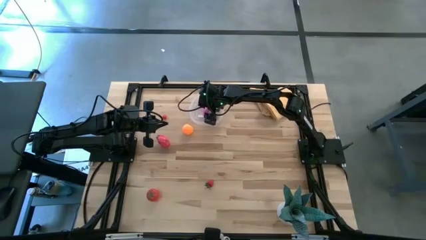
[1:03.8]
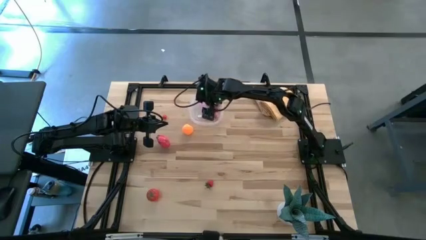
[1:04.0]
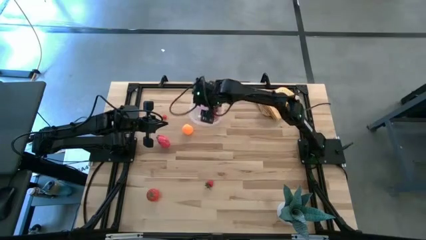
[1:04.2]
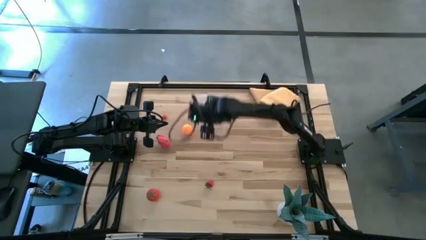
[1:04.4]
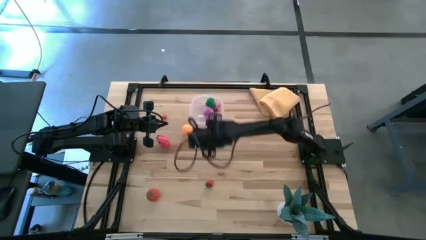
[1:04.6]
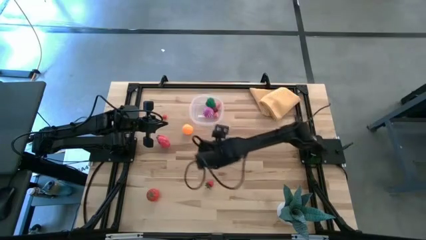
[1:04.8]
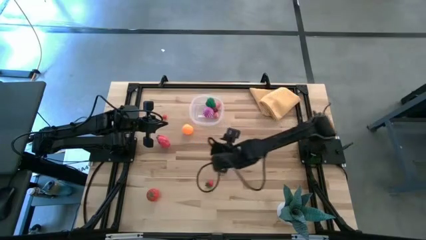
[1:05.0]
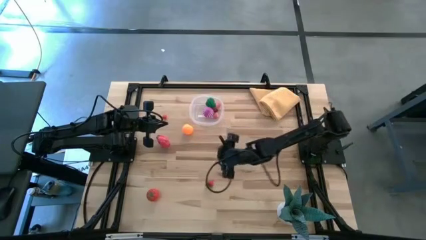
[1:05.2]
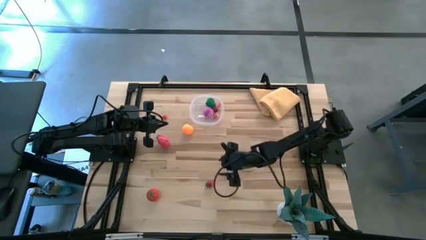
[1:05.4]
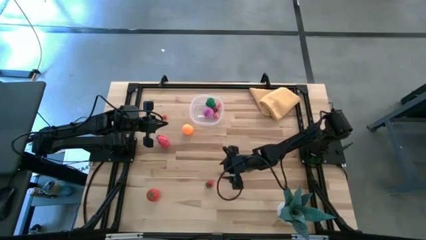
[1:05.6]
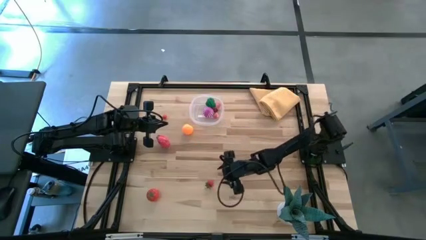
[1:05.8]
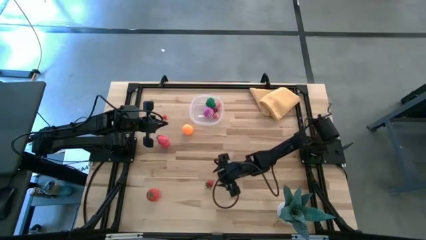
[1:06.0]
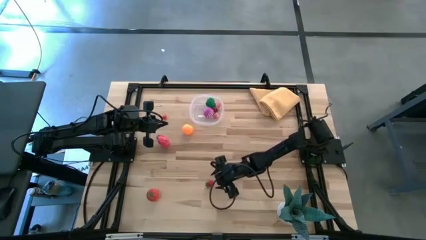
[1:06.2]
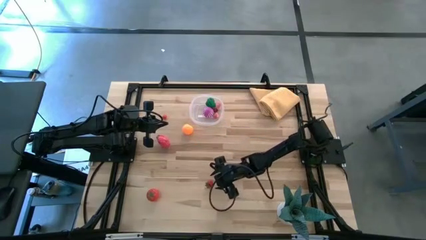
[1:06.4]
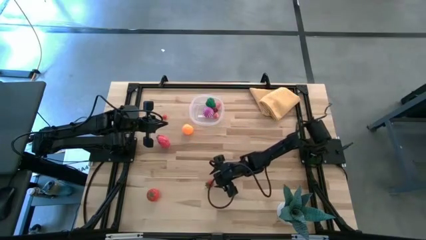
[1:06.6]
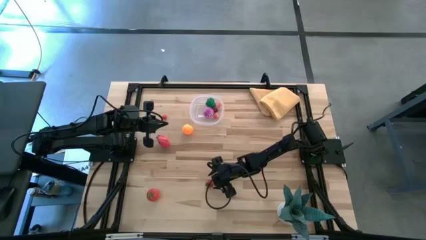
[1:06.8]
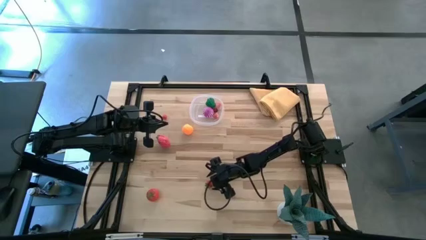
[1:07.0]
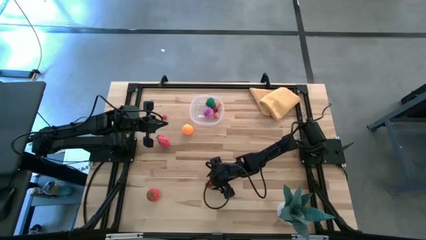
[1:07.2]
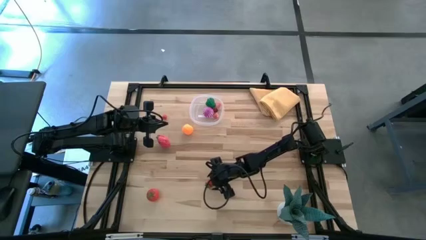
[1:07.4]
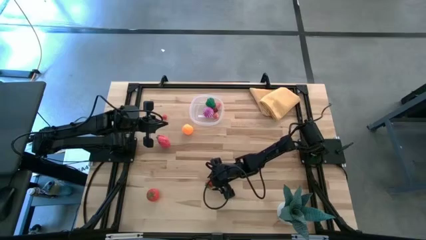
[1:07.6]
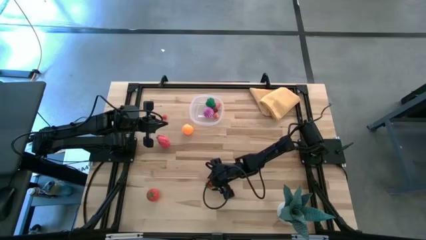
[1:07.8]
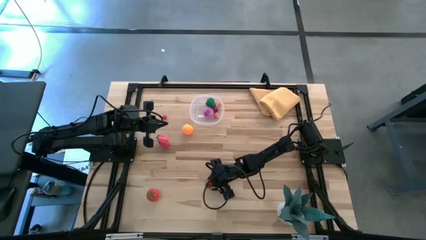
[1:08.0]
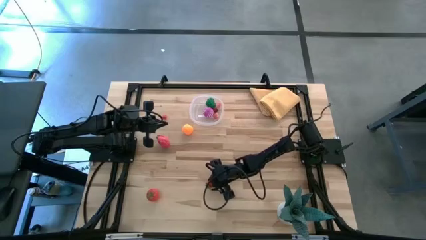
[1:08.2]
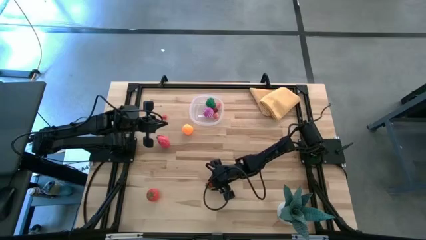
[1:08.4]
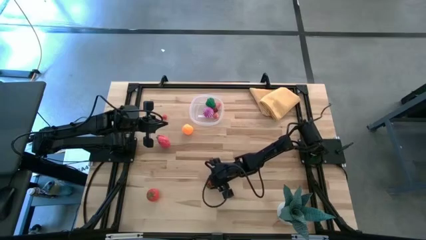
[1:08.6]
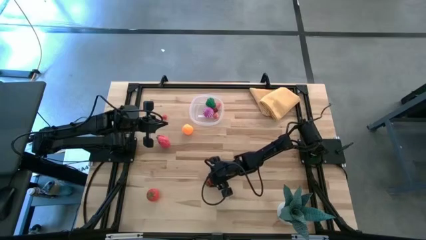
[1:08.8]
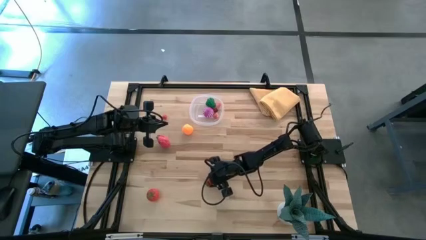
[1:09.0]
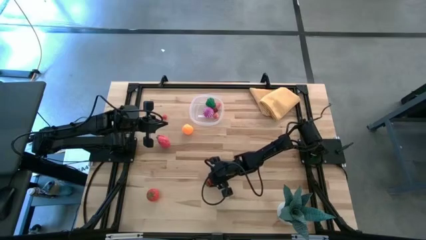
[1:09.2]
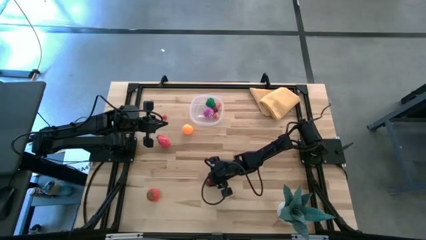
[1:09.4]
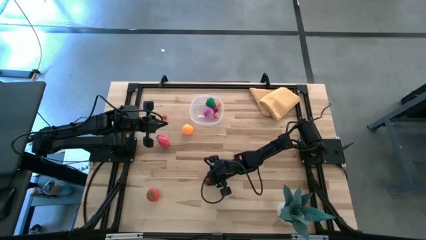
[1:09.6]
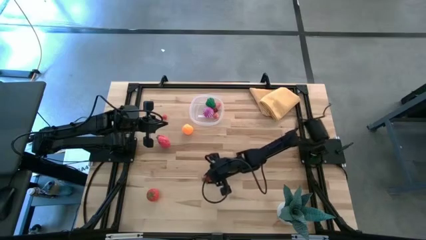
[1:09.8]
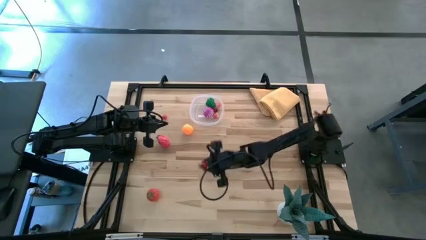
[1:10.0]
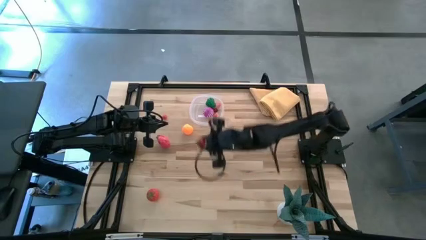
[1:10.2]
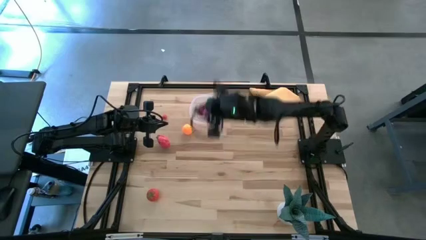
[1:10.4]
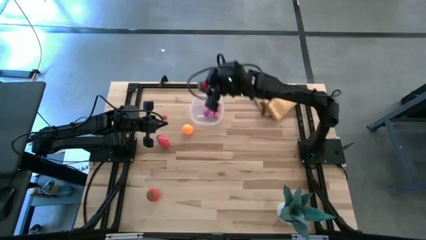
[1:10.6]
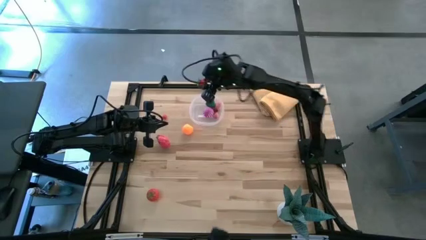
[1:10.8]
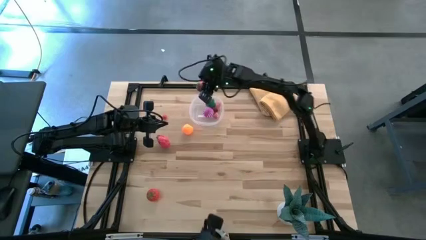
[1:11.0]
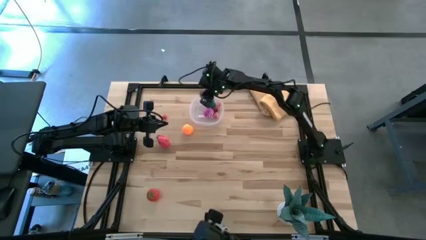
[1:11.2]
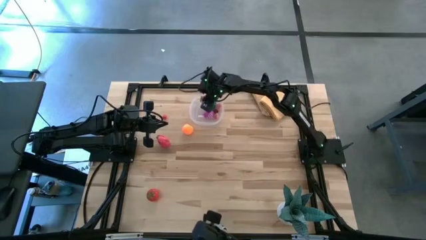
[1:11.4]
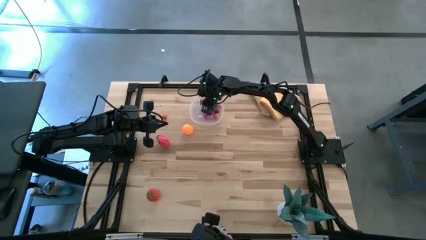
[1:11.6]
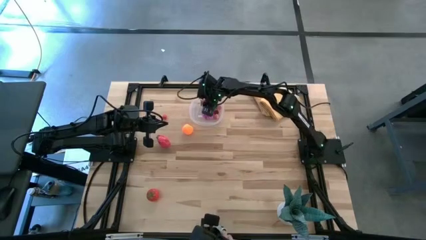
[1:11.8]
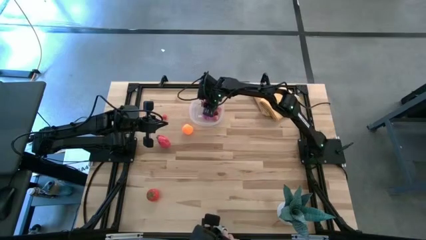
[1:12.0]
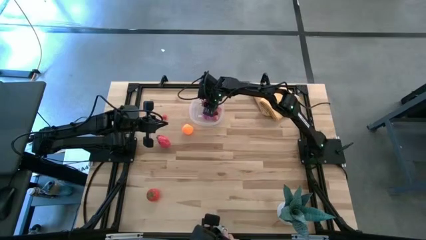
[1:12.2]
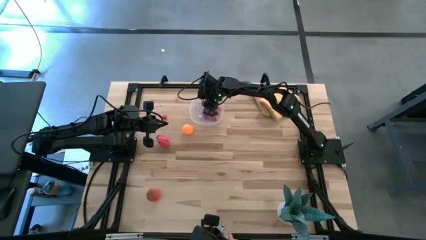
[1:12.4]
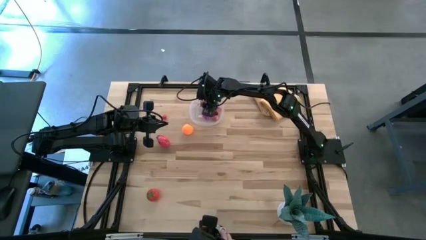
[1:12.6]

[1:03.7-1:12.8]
Task: Pick and placing Produce into tupperware
Put the red strawberry into the transparent bin

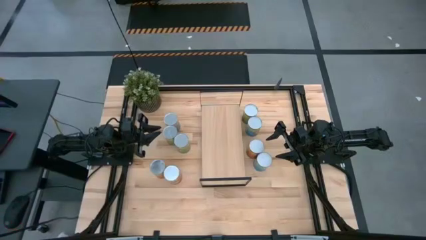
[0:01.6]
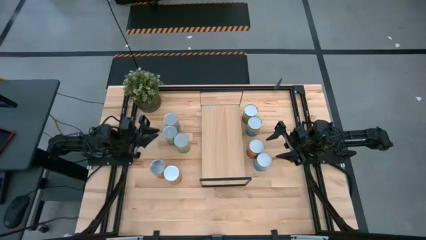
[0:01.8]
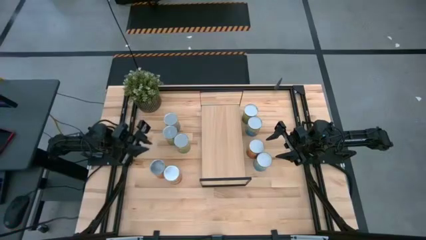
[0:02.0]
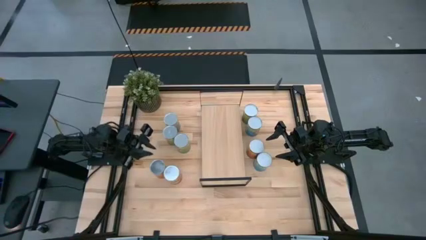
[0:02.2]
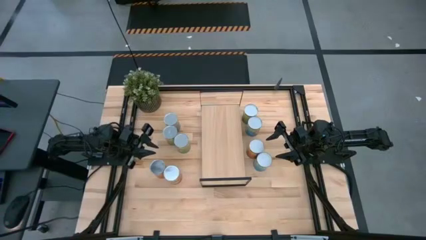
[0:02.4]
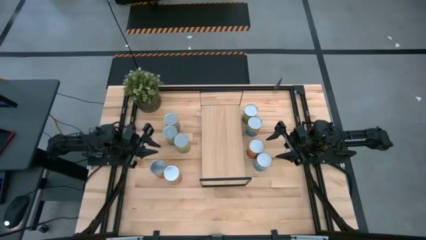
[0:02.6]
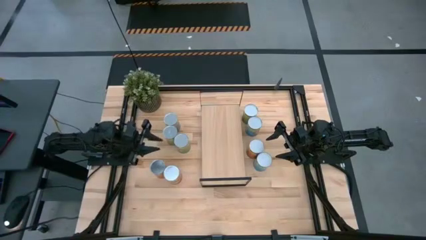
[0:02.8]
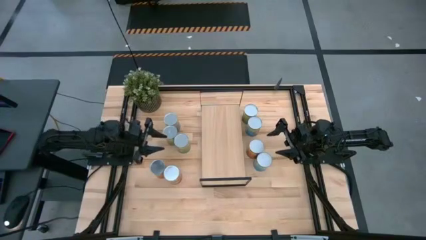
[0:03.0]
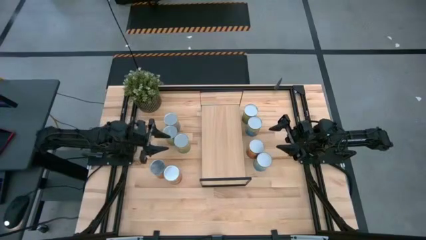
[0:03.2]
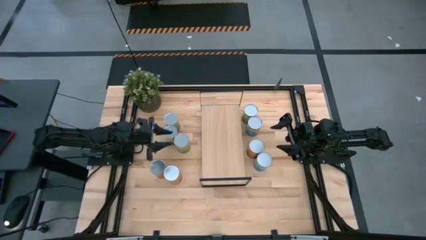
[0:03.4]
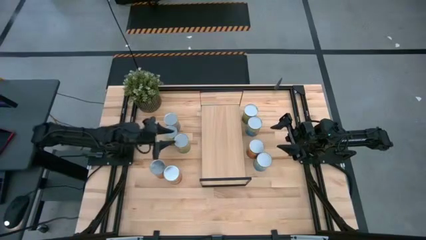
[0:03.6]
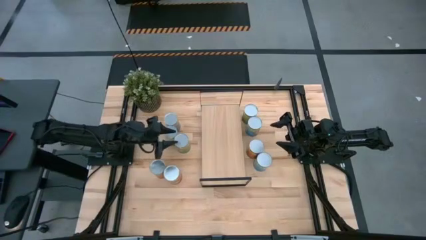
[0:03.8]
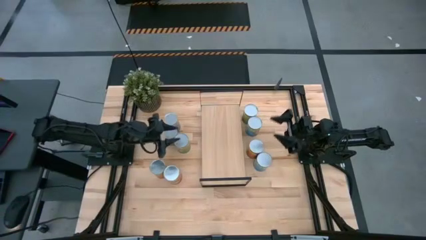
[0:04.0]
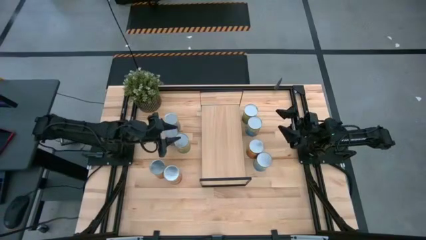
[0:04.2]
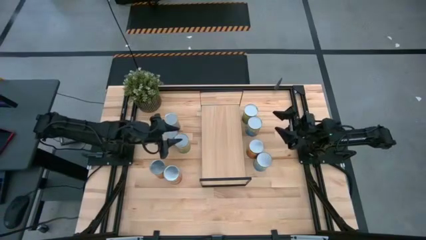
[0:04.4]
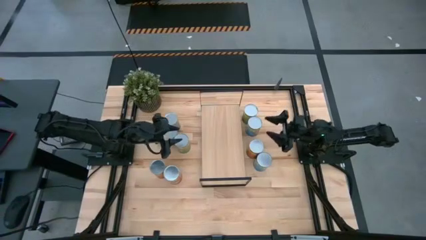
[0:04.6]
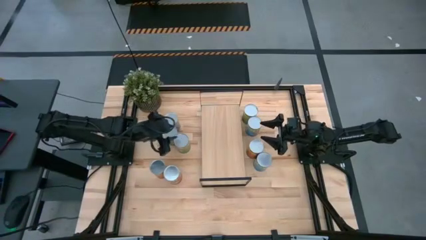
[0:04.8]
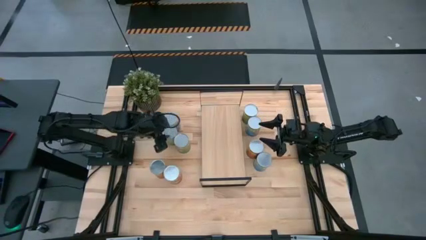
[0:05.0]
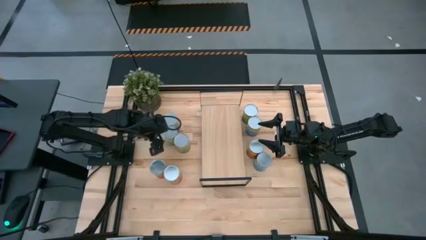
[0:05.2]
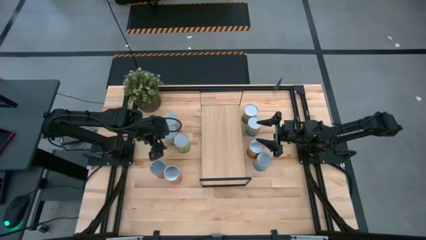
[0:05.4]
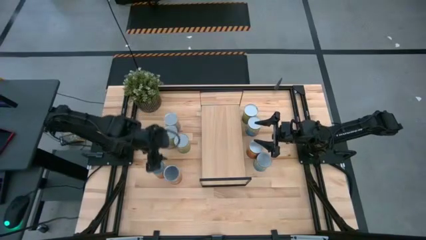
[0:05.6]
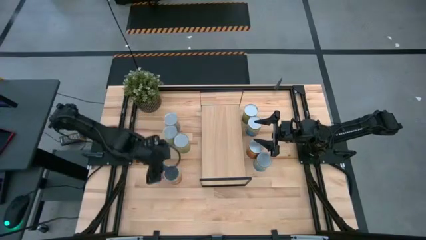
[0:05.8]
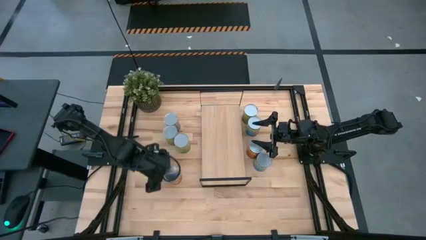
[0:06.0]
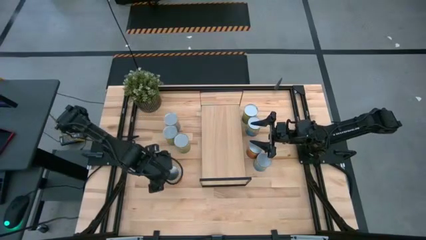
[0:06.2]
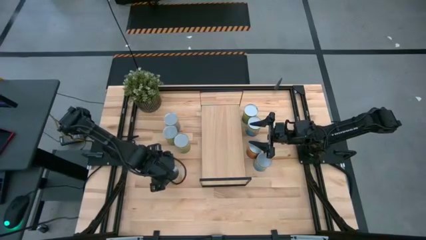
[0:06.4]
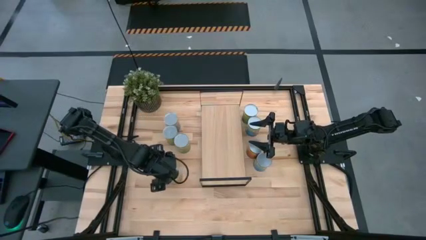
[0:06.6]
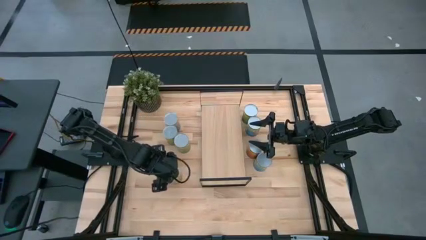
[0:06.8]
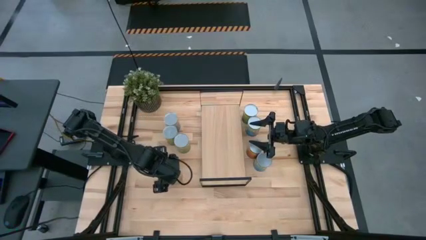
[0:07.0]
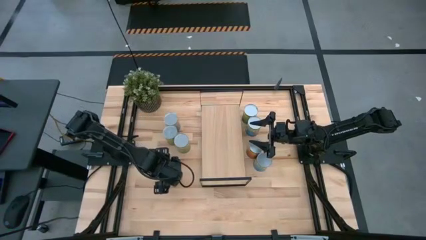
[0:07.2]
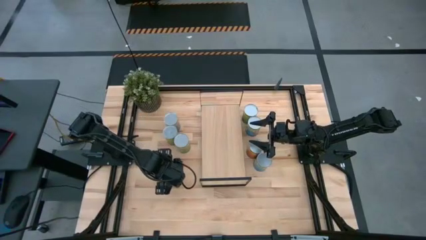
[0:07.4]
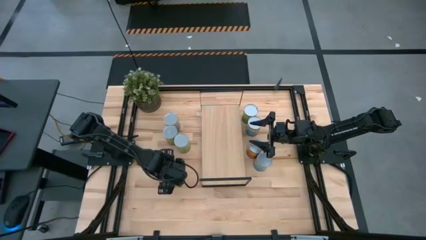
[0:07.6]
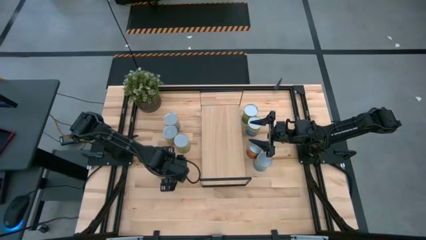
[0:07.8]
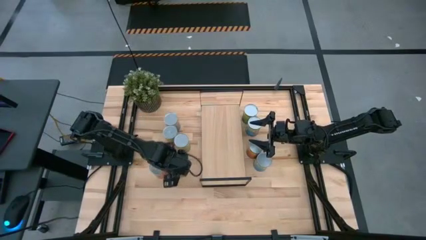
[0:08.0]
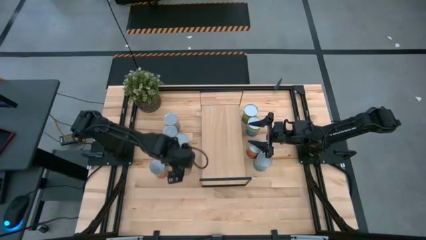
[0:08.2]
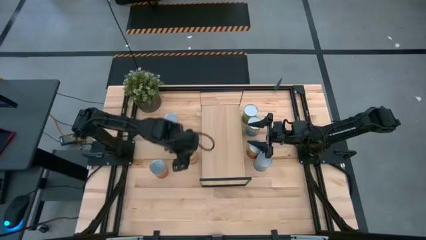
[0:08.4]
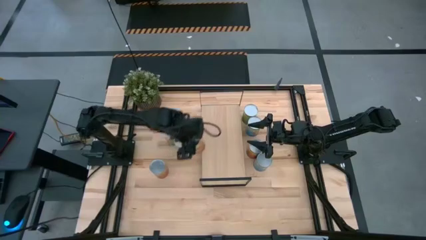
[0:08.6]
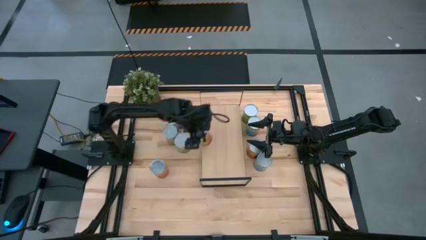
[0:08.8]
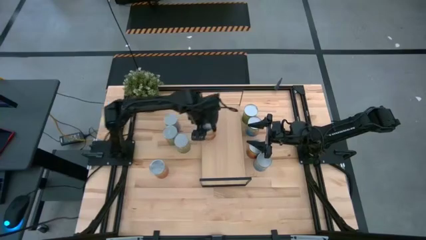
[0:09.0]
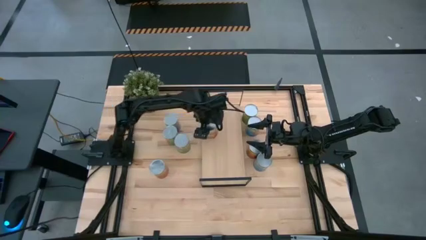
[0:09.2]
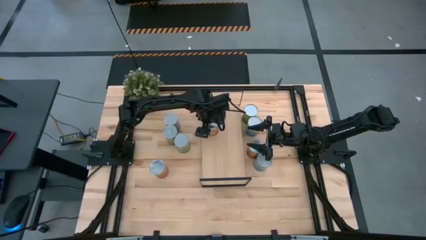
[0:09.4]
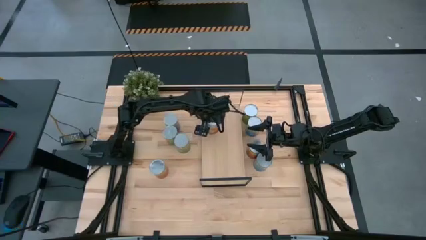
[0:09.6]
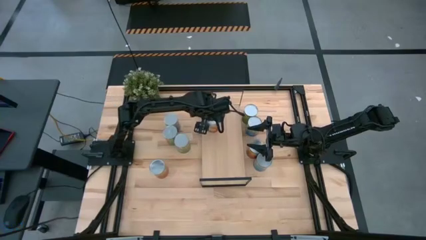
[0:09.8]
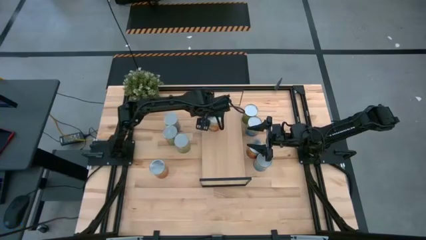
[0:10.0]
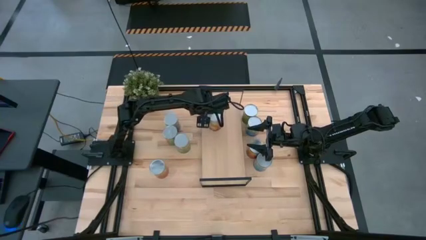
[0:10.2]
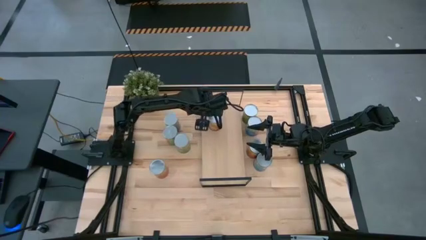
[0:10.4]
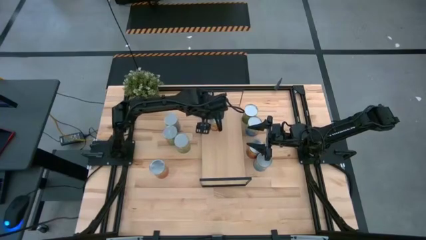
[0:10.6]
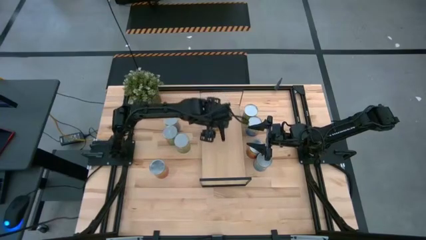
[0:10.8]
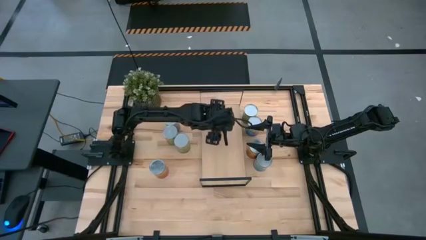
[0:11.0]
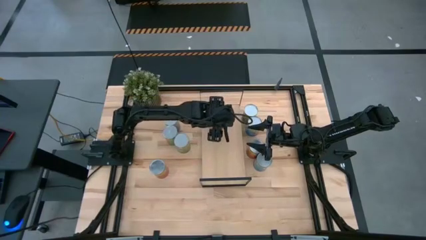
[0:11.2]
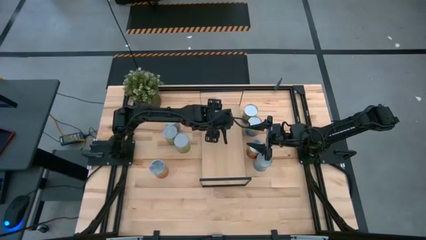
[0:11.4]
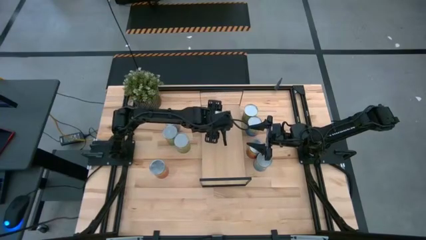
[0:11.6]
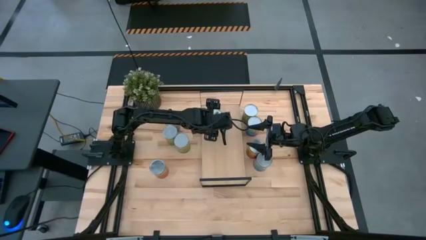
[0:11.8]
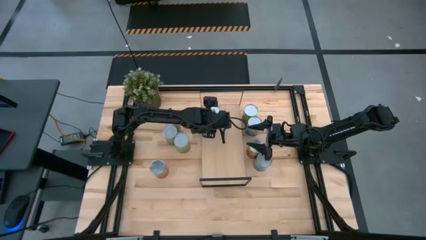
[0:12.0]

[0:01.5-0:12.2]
Task: Pick and place cans onto a shelf
Put the canned corn on the shelf
